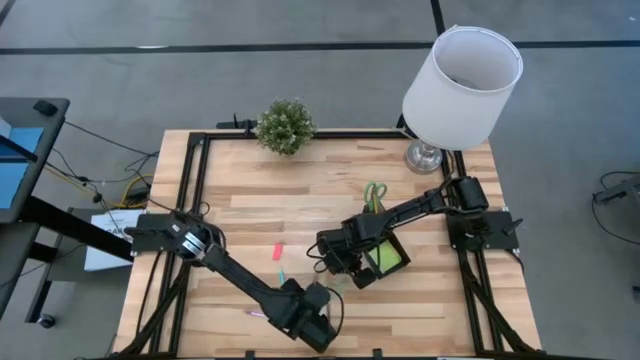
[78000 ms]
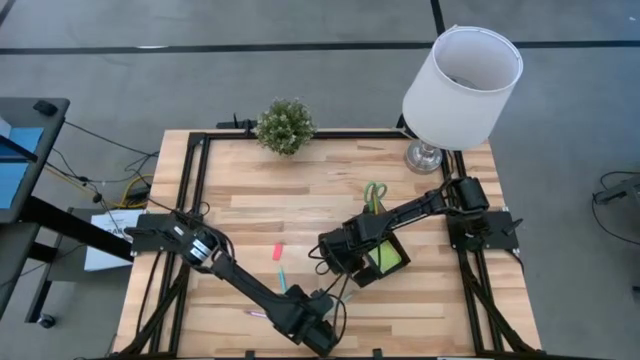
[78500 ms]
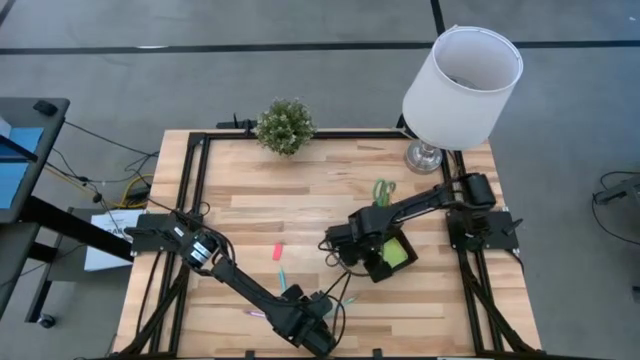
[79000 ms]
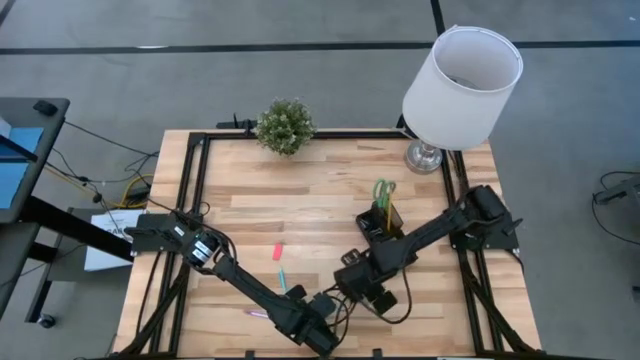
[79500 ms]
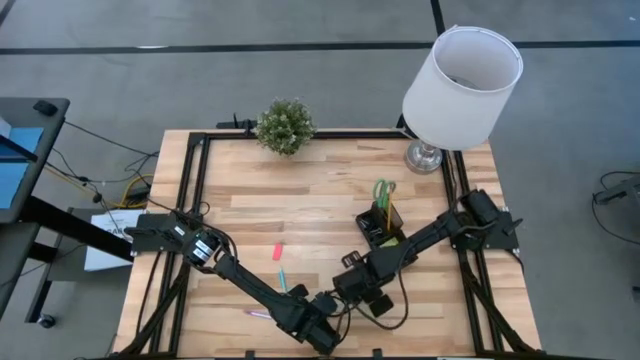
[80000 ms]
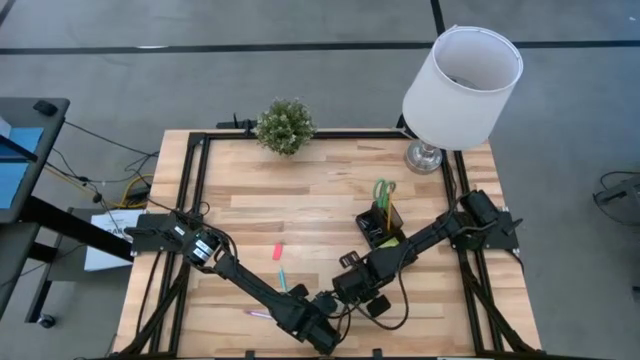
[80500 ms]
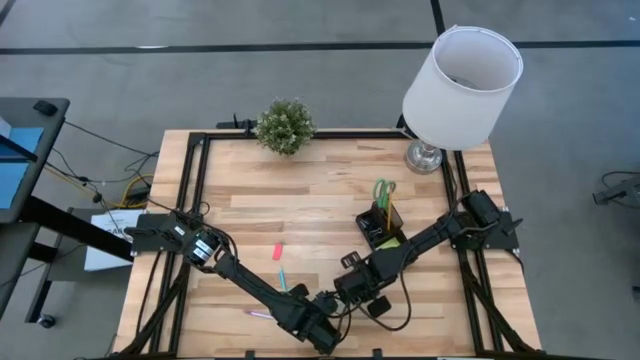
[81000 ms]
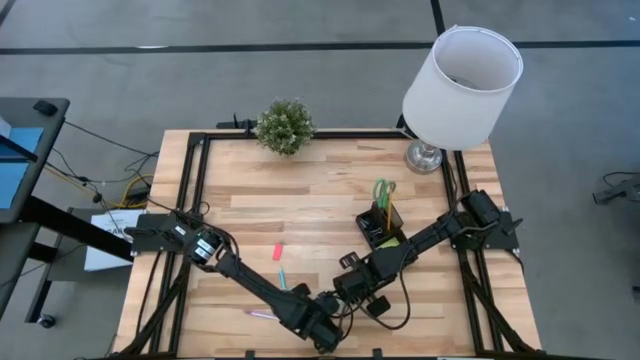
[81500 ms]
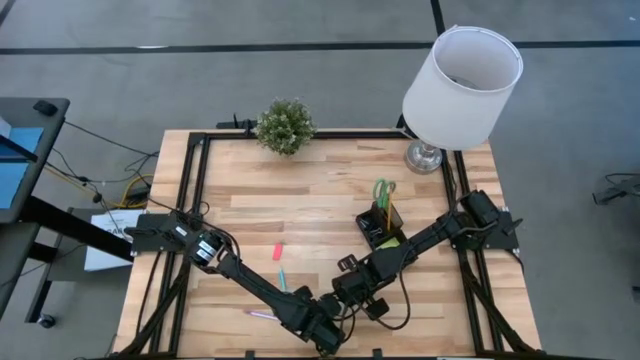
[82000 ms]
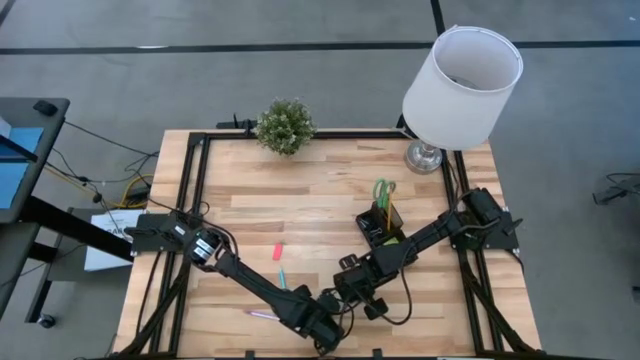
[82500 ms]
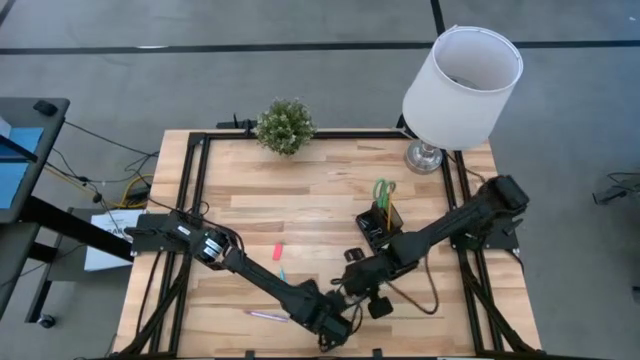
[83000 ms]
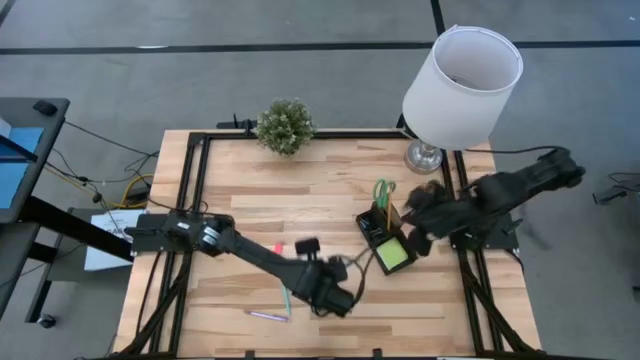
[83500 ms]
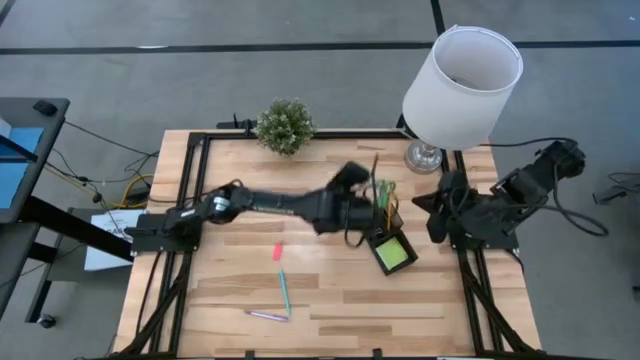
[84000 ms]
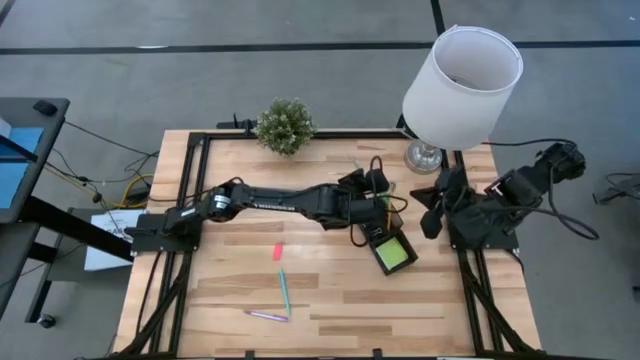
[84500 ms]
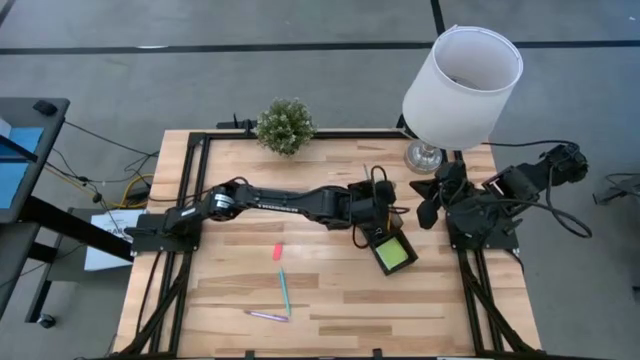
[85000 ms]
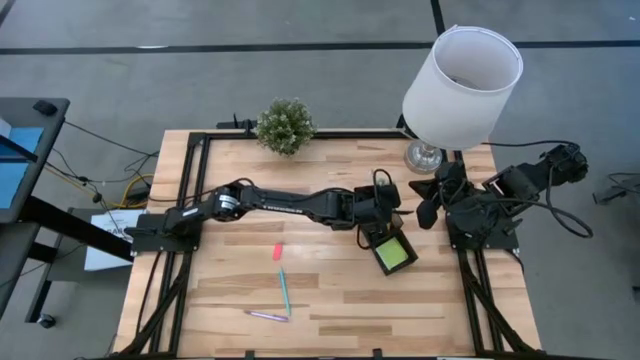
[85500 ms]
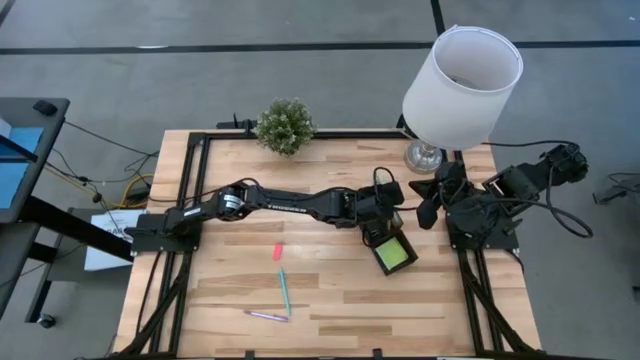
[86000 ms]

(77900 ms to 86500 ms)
Task: Pick and place office supplies into organizer
Put the blue pencil into the black desk organizer

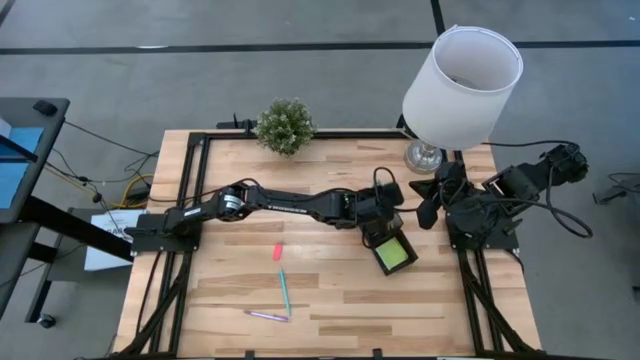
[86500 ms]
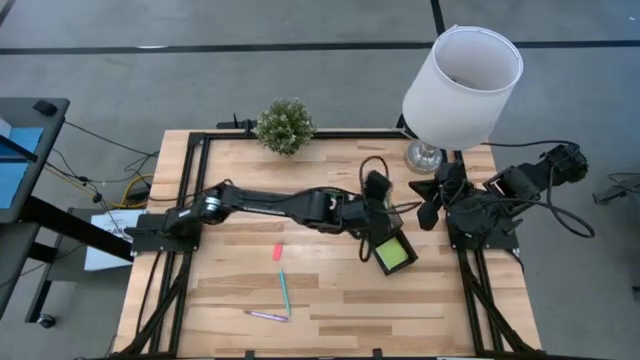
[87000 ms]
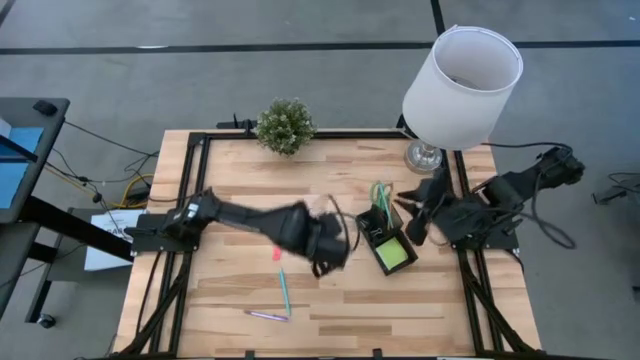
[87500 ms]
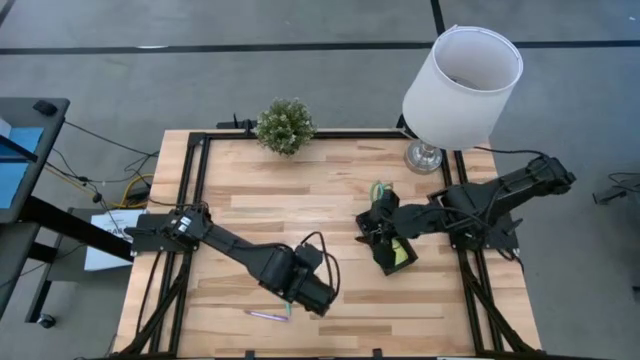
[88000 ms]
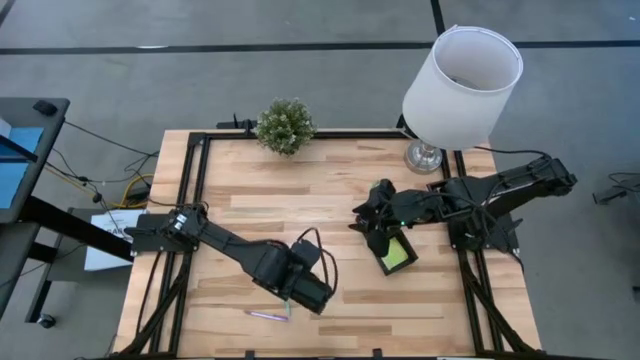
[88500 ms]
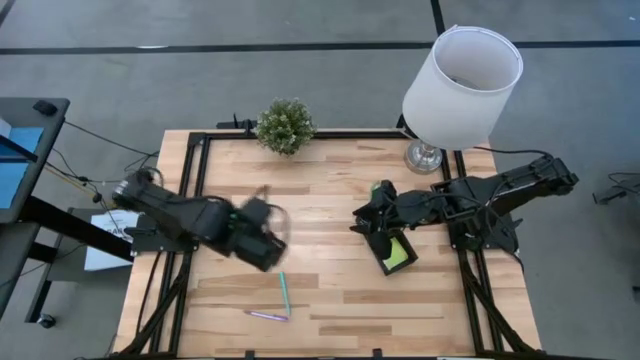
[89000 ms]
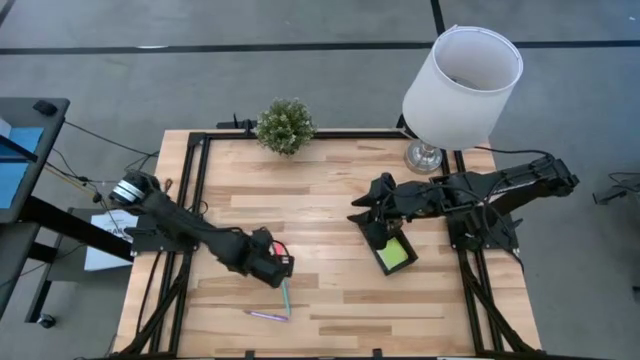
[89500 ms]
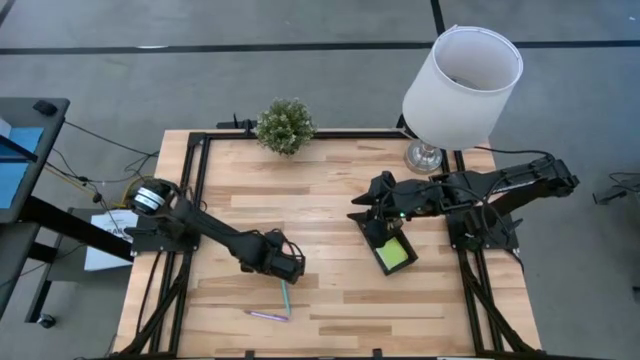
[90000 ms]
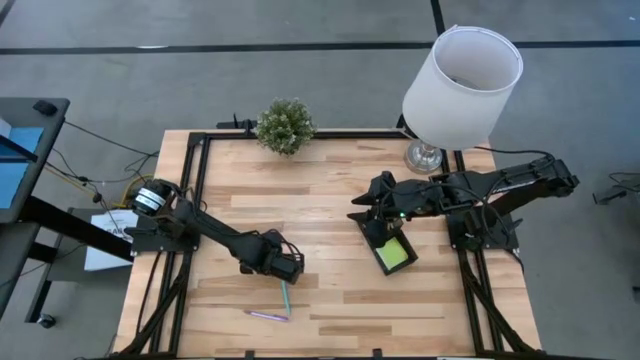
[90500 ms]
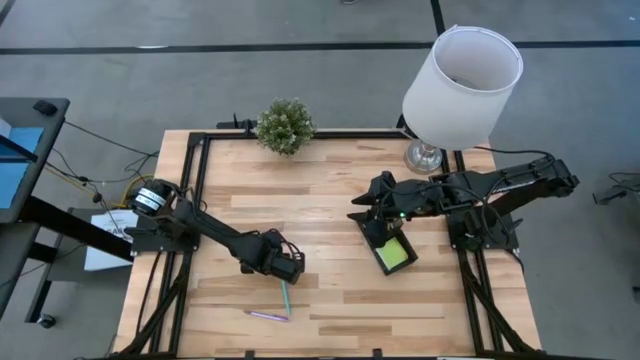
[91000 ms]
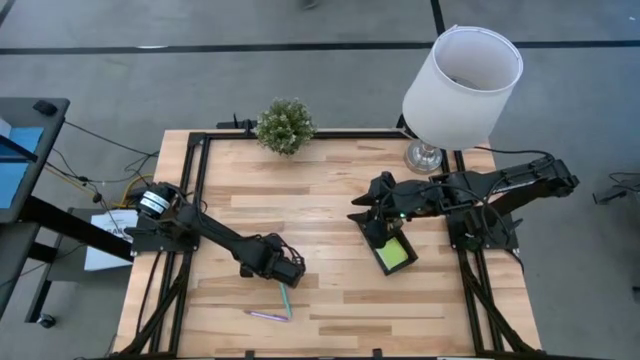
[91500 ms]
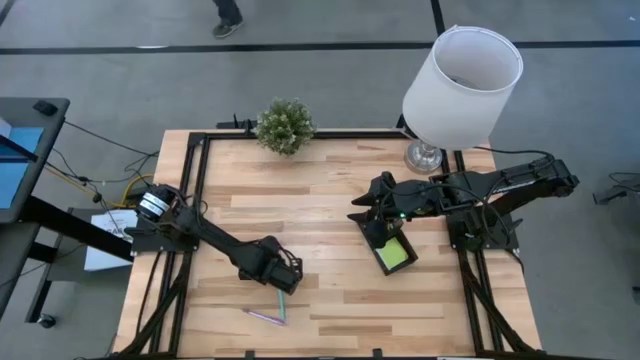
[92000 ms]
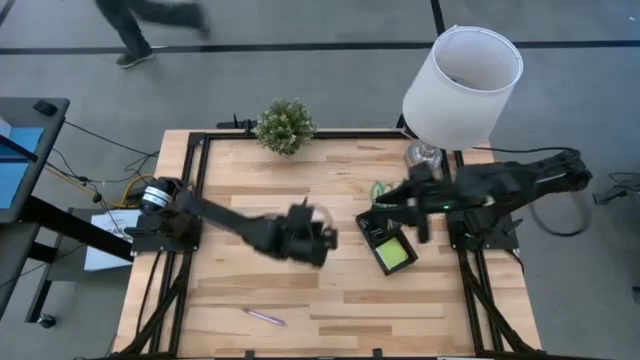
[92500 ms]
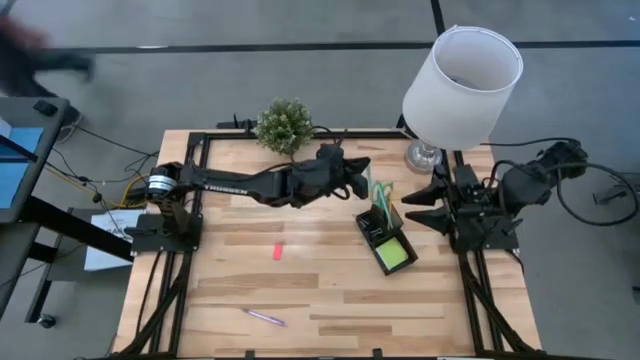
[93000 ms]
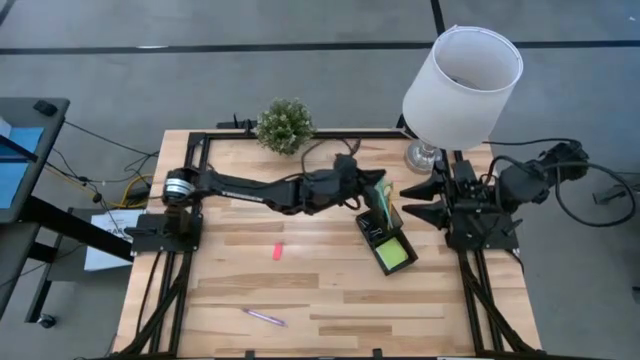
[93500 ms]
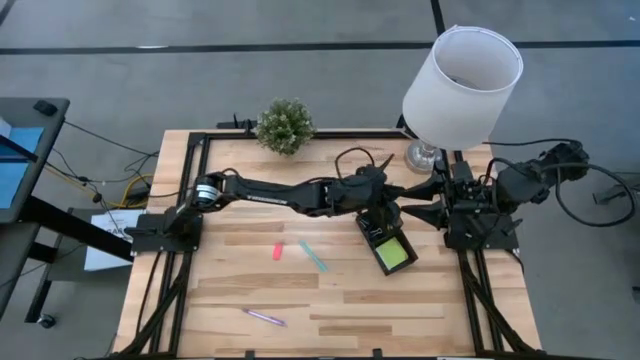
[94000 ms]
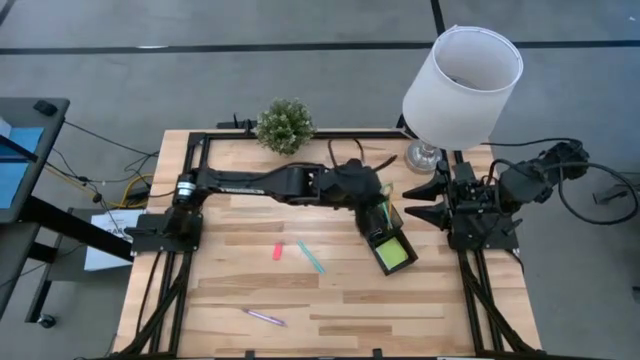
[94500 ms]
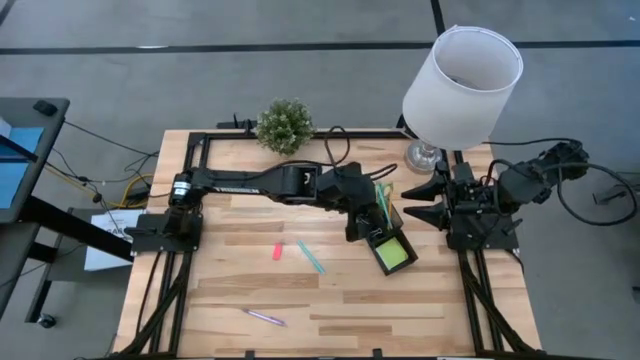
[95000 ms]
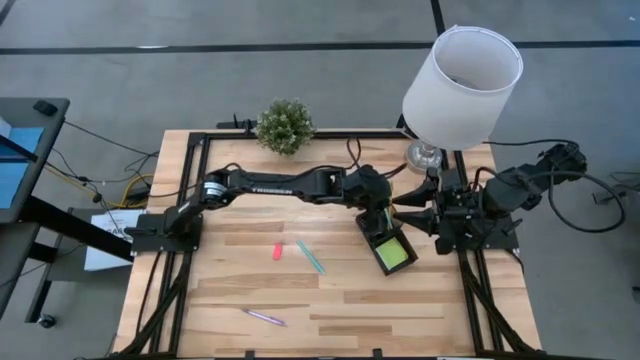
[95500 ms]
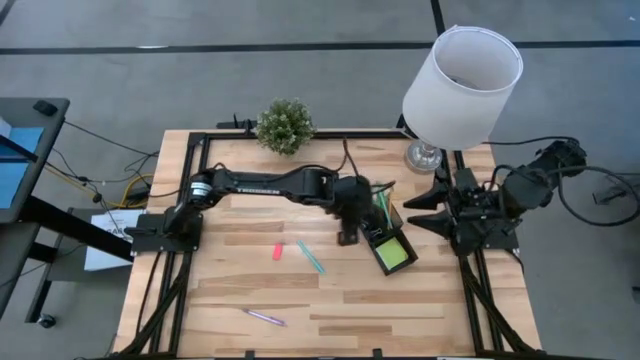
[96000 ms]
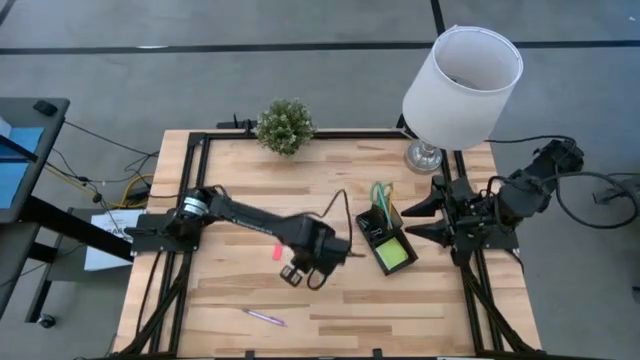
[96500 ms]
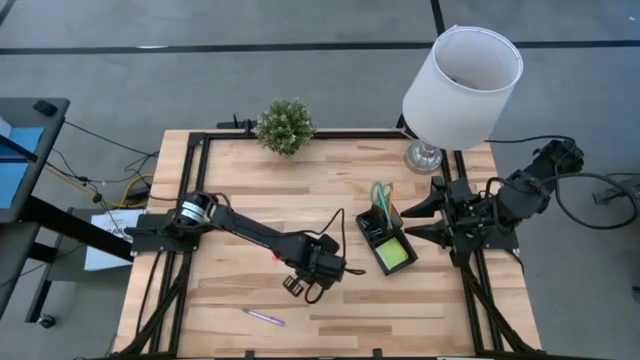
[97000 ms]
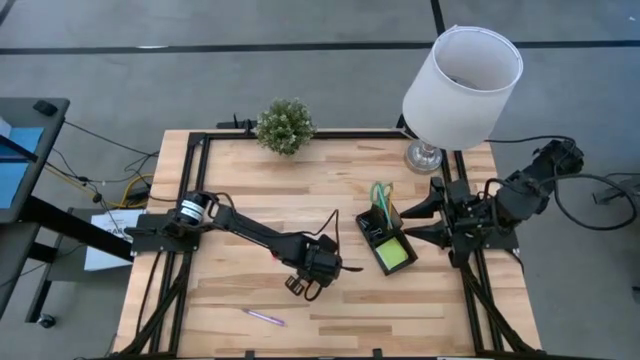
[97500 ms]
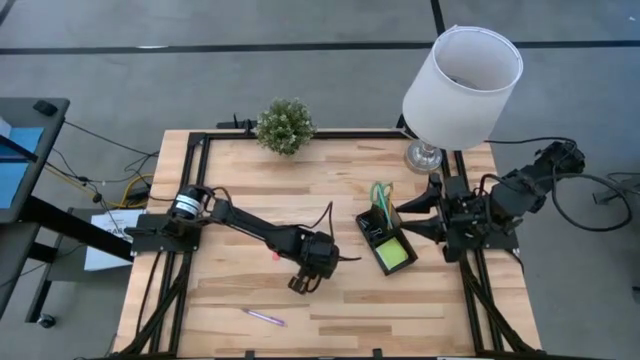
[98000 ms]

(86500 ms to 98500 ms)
Put the blue pen into the black desk organizer

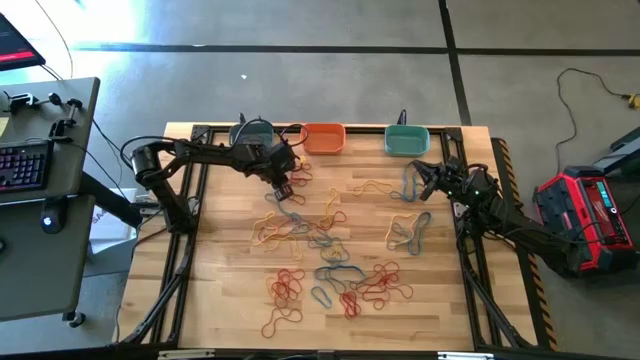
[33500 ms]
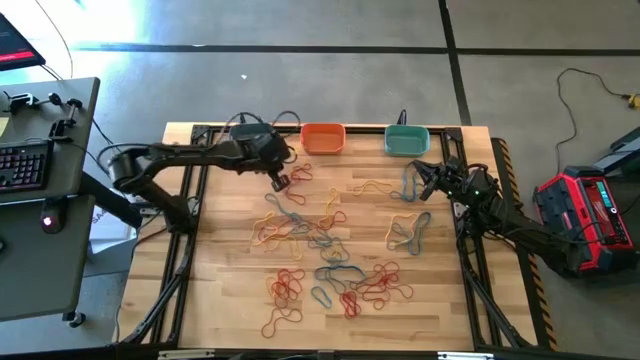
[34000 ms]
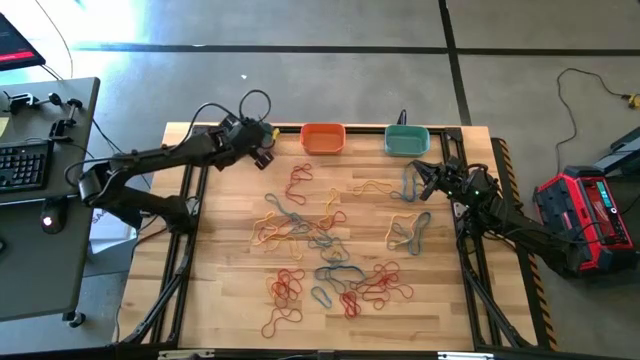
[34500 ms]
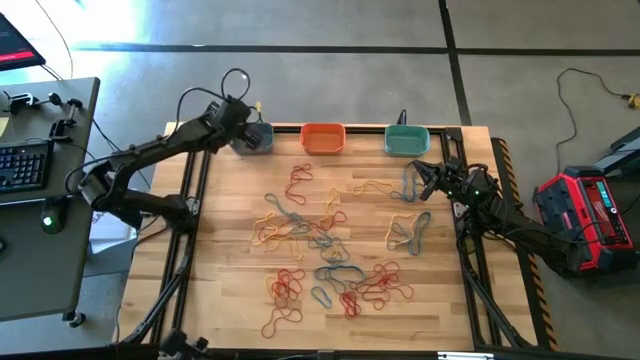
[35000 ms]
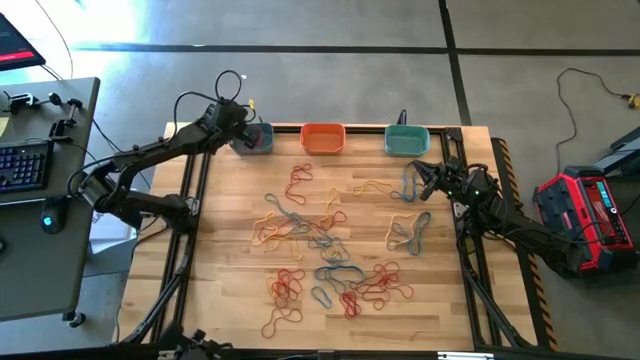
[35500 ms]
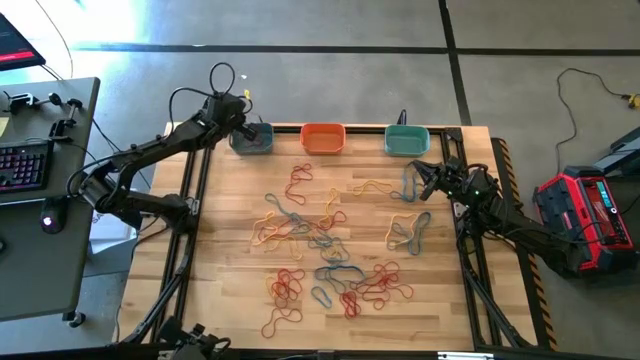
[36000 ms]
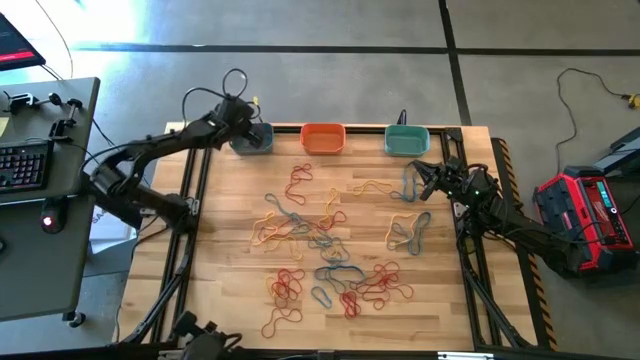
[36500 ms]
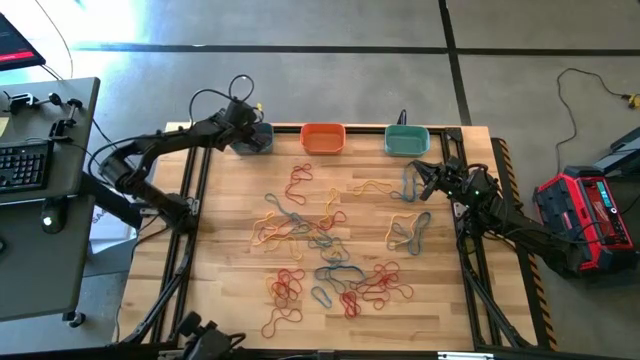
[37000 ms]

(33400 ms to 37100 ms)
Task: Sort rubber bands into baskets
Put the red rubber band into the blue bin
